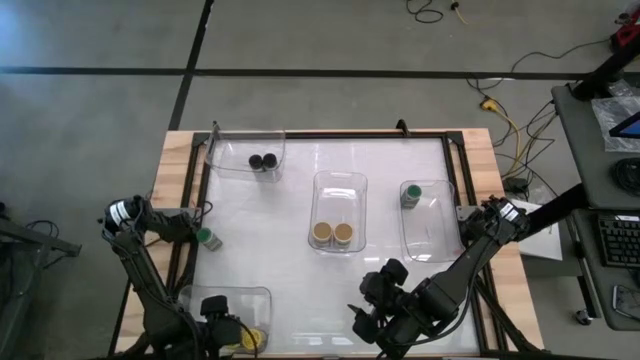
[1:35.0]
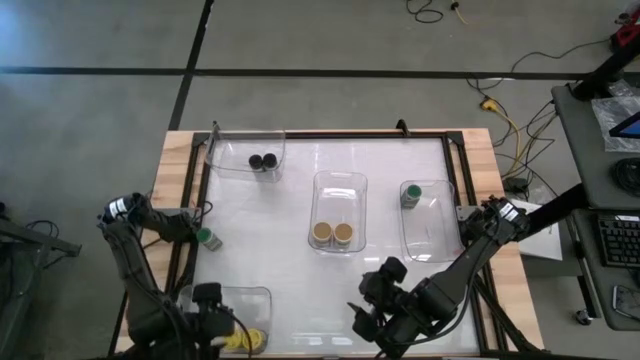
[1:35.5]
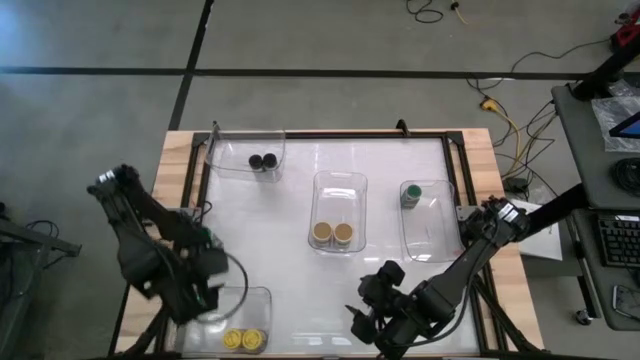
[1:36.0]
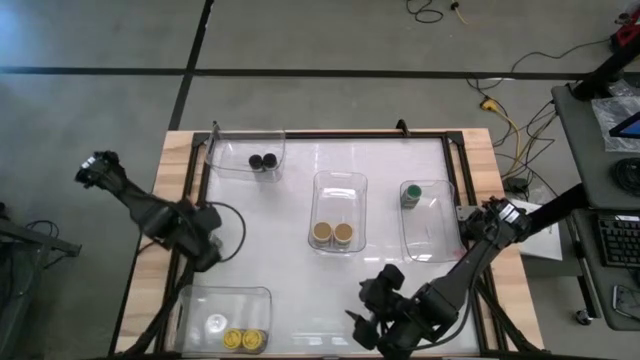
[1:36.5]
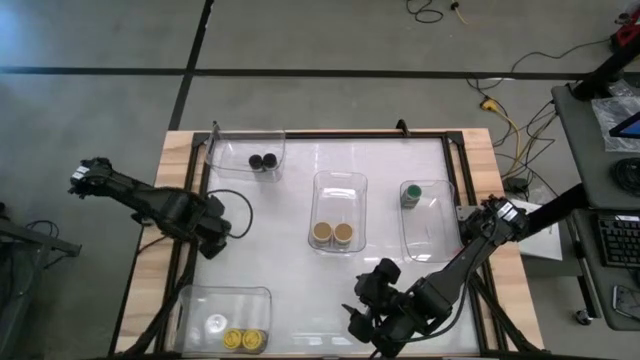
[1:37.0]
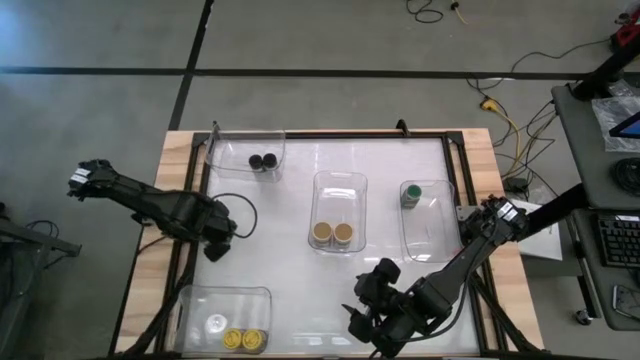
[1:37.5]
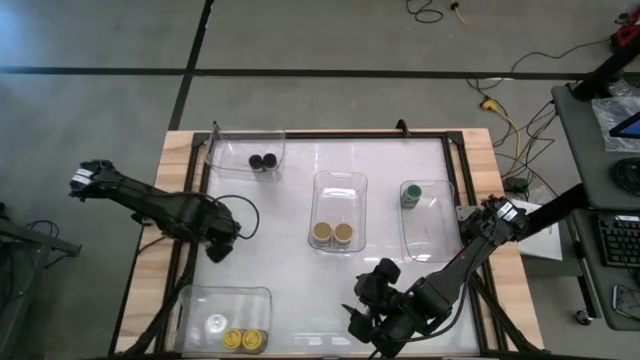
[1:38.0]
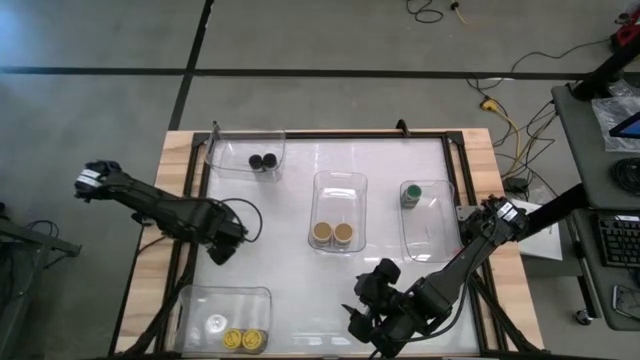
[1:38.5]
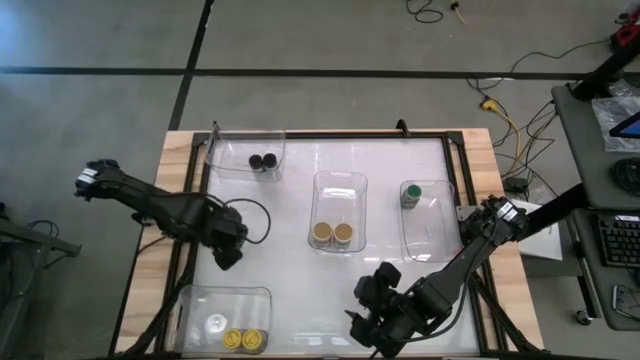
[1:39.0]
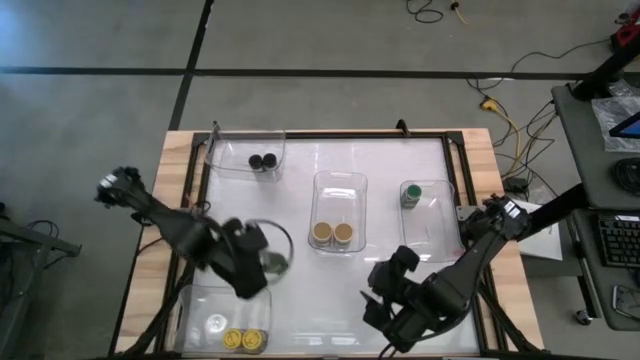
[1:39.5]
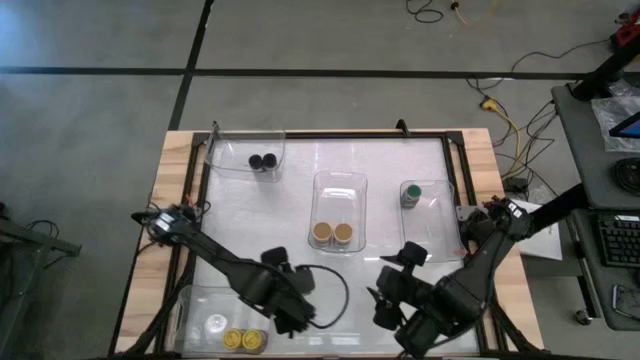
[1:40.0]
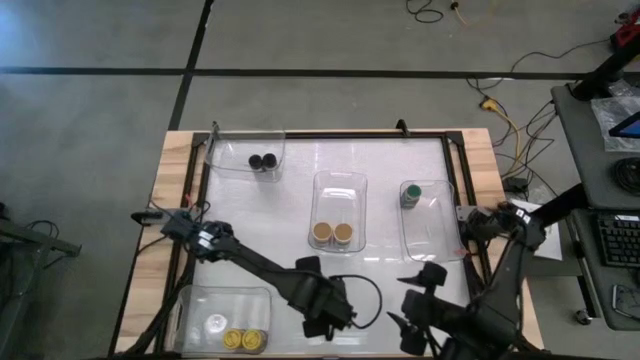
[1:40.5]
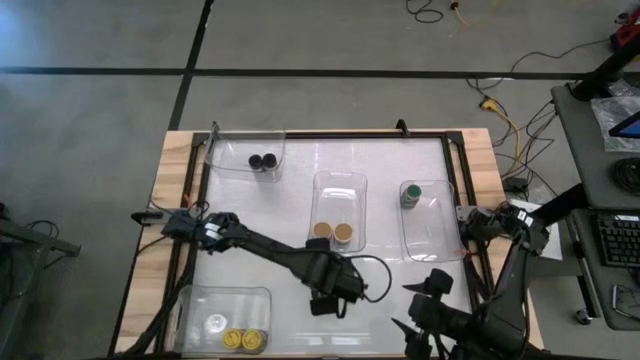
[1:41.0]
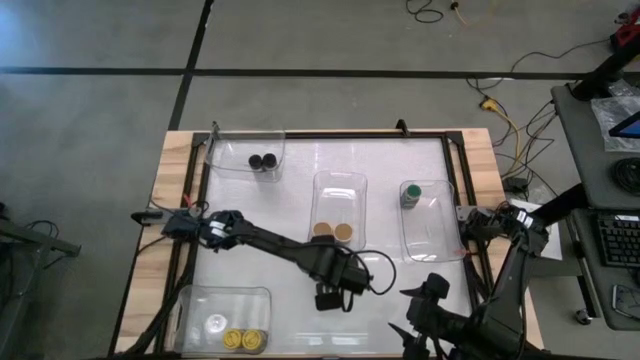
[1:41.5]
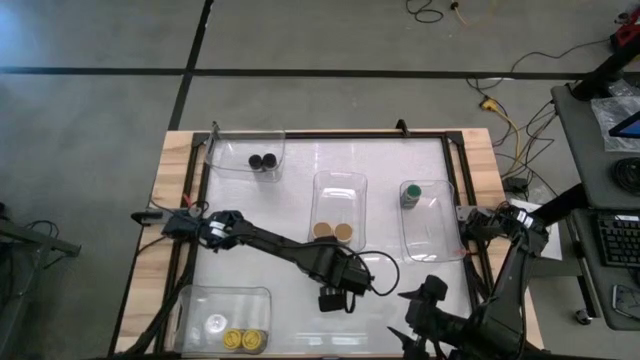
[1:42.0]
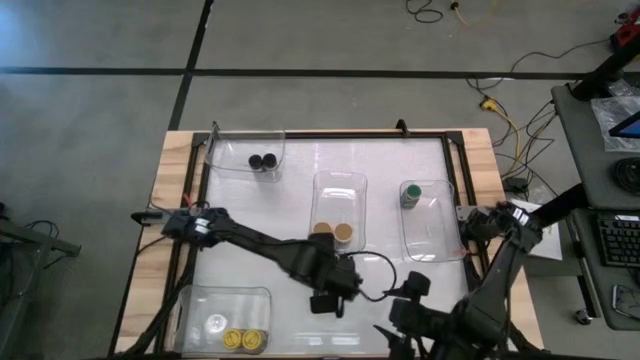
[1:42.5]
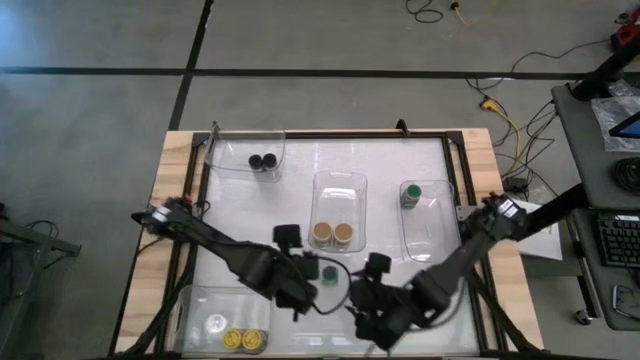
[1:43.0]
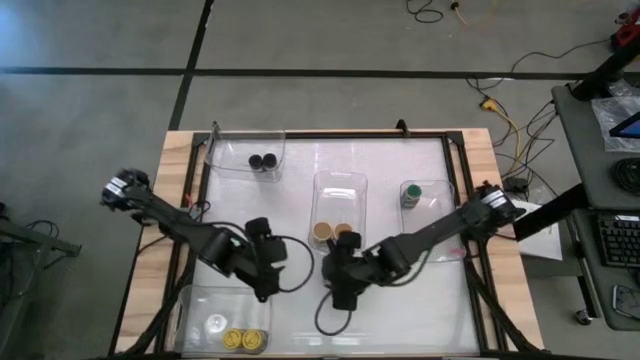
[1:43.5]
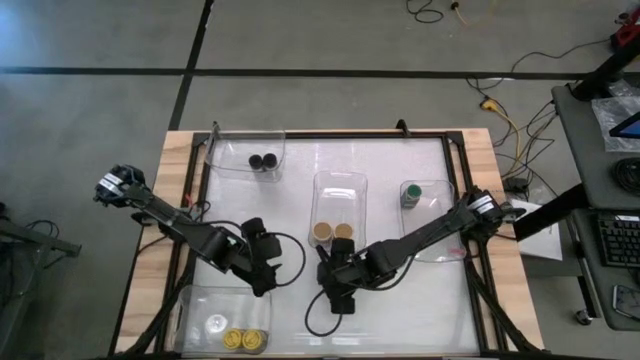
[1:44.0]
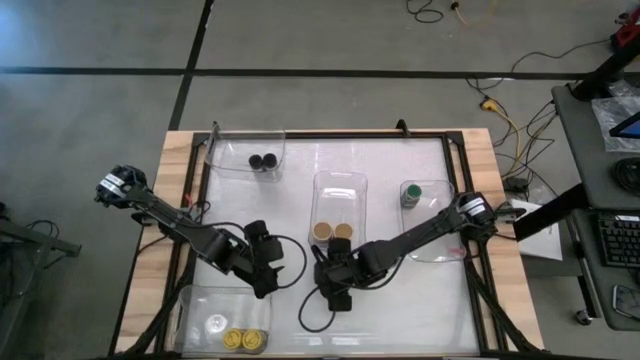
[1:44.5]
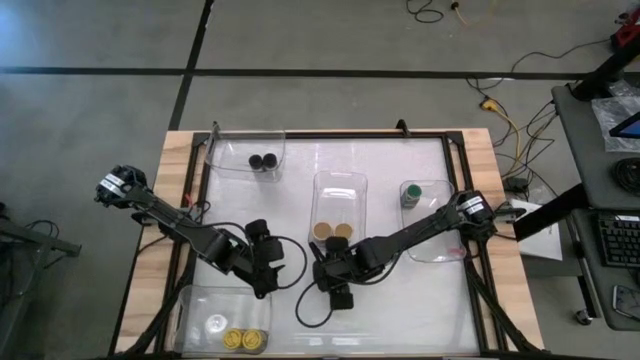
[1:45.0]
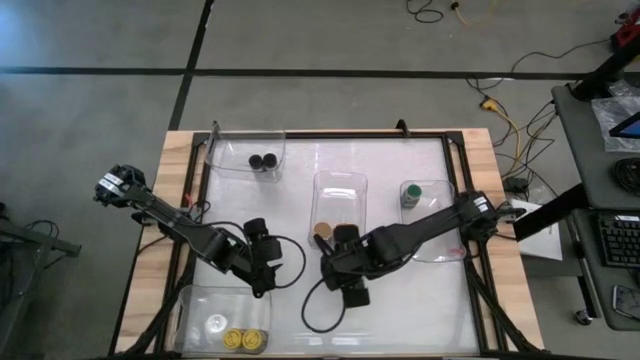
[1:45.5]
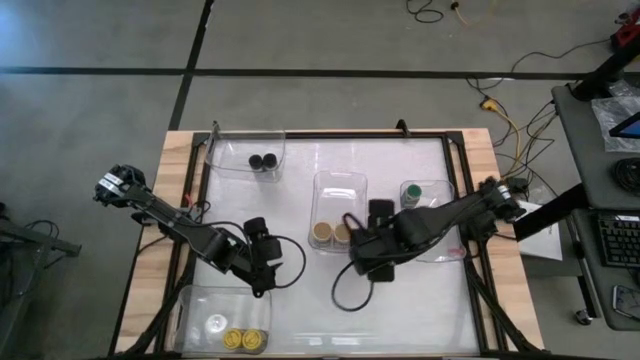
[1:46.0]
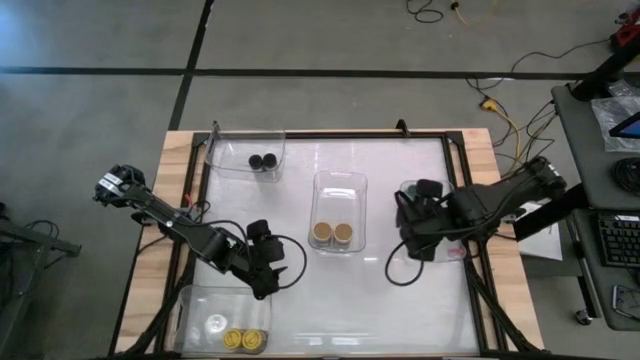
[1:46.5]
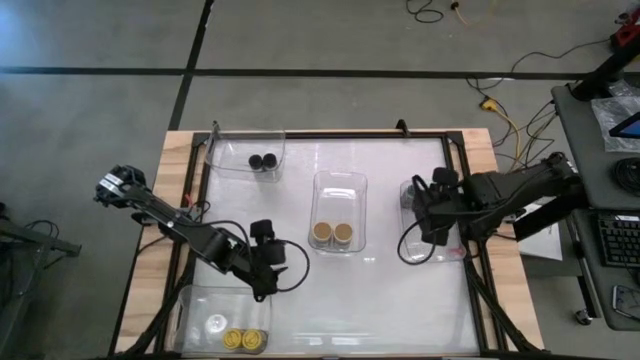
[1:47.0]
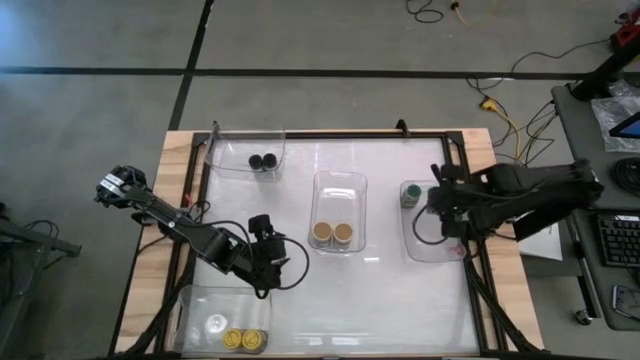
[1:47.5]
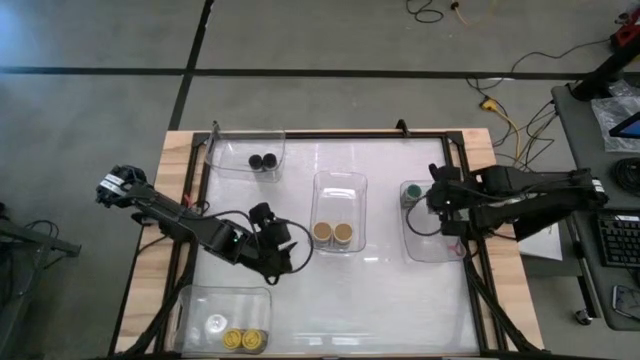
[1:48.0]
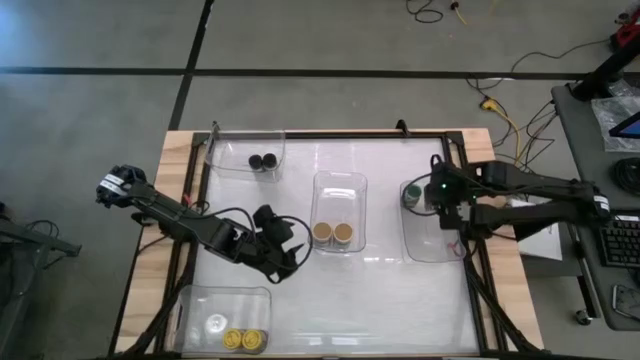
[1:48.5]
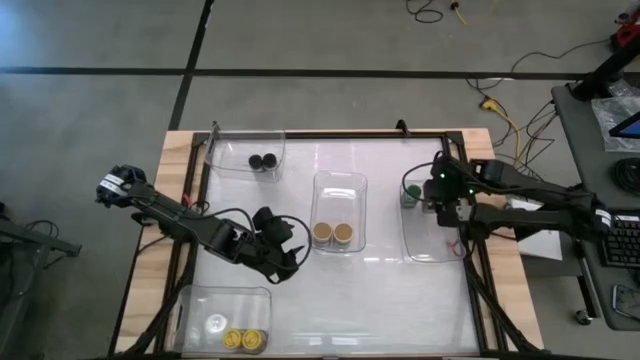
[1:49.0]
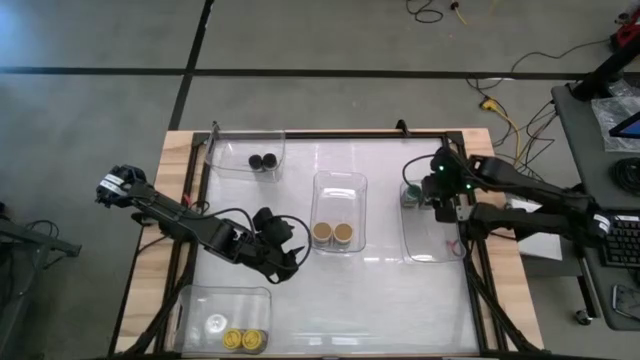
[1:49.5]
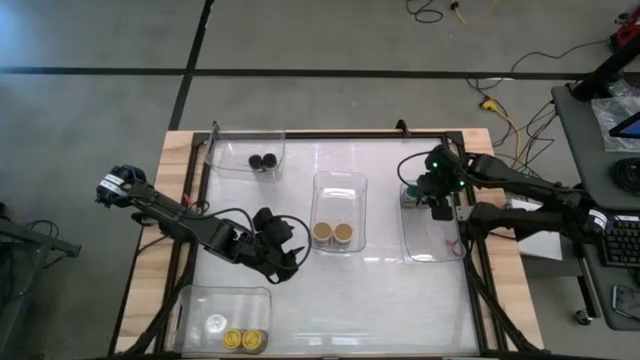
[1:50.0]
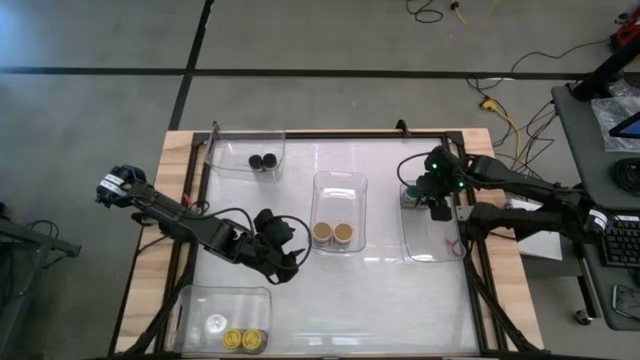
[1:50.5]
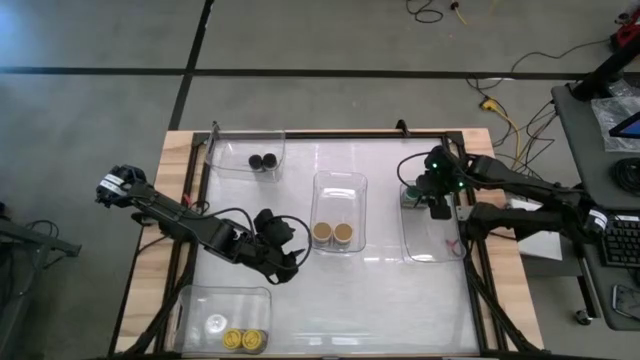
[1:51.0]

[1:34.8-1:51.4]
Task: Sort spices by type
Put the green seasoning bottle into the middle right transparent bin

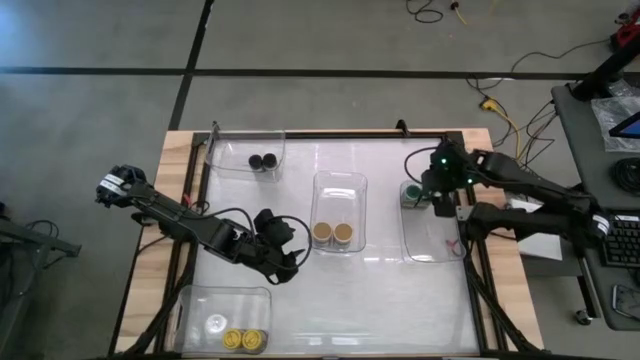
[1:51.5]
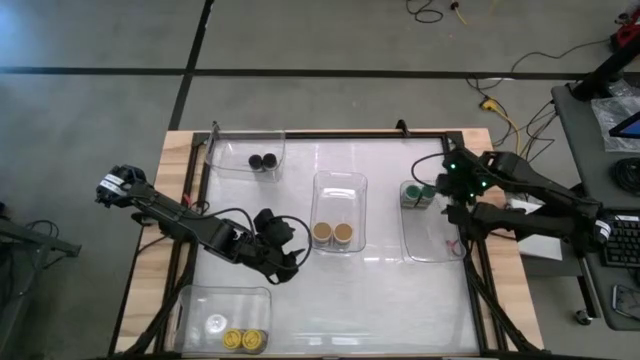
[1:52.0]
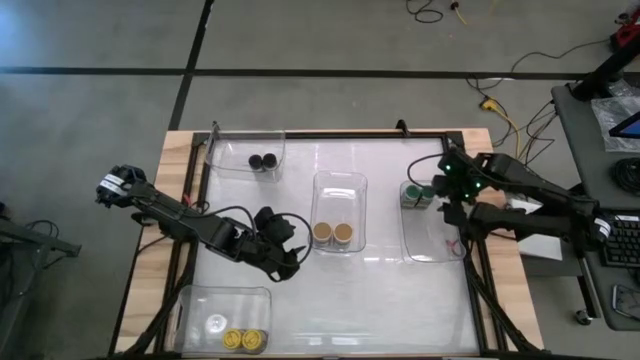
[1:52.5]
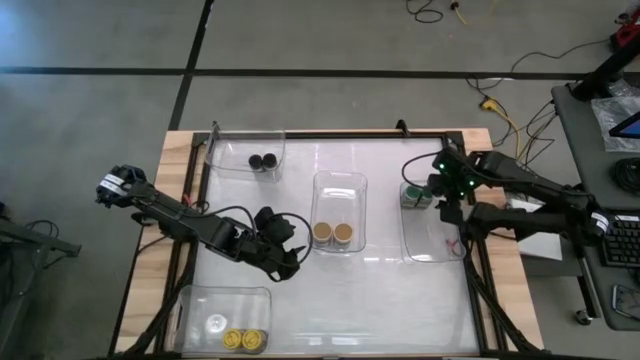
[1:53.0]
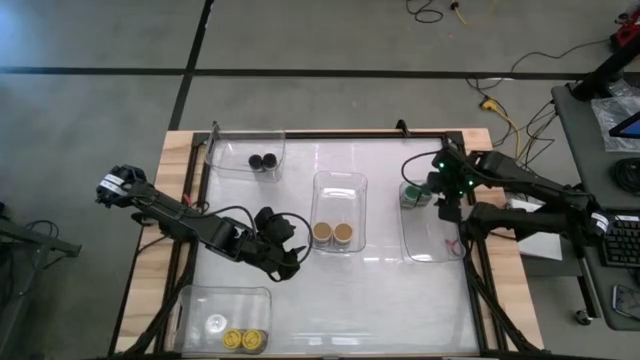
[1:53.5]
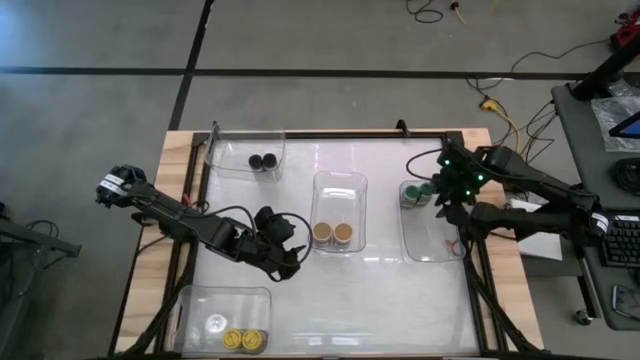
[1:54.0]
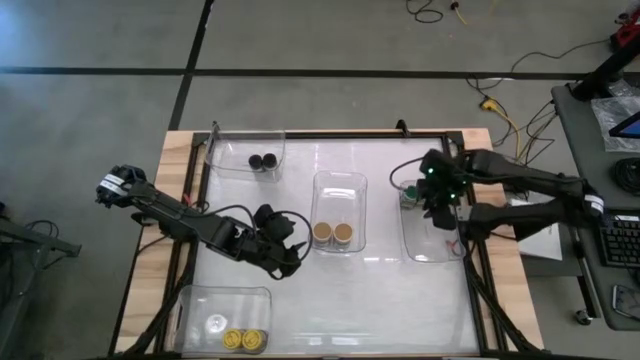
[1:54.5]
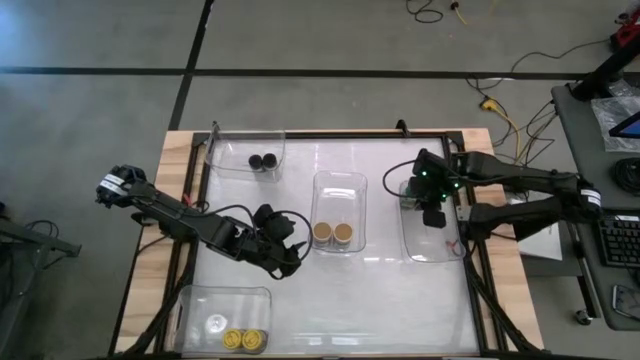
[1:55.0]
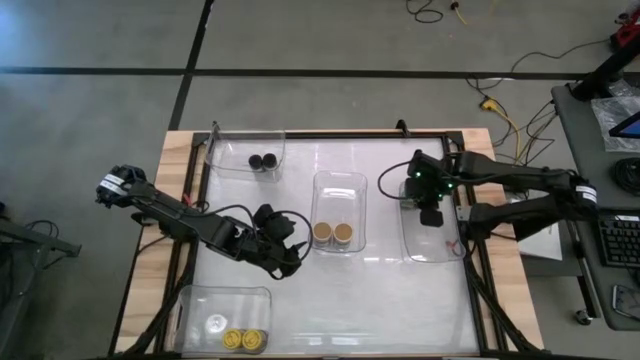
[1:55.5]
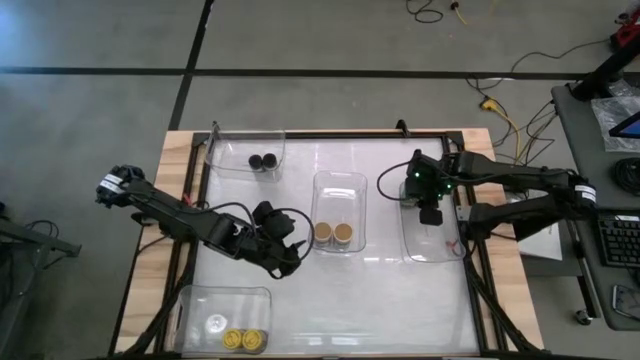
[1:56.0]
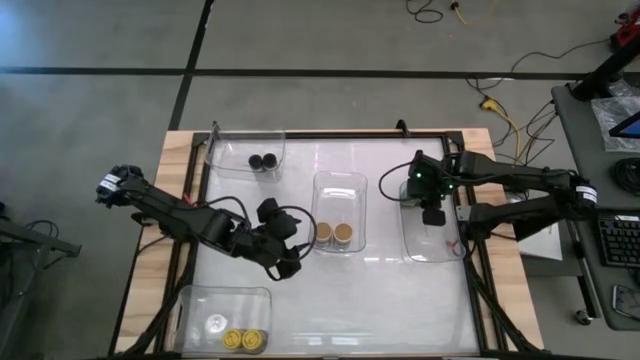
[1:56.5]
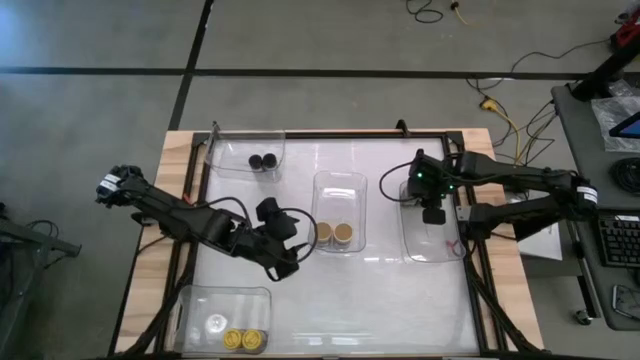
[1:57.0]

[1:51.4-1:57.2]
Adjust the green seasoning bottles in the middle right transparent bin
